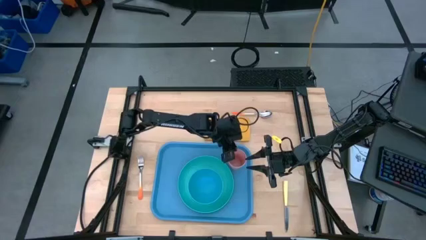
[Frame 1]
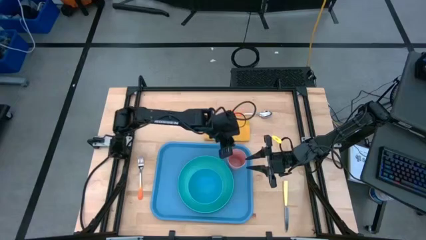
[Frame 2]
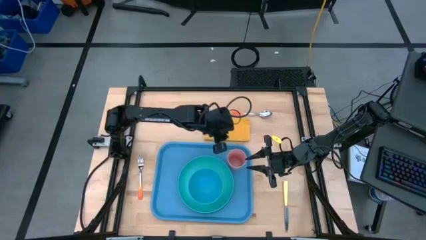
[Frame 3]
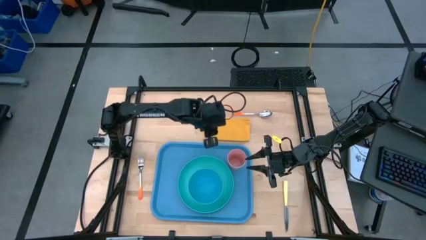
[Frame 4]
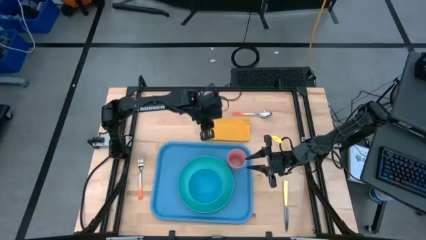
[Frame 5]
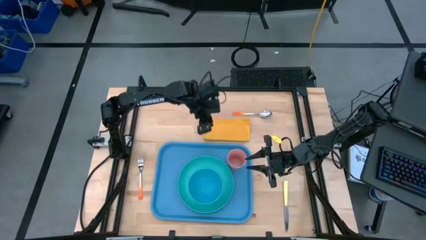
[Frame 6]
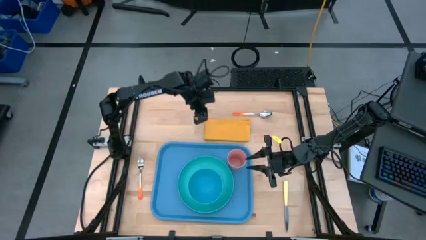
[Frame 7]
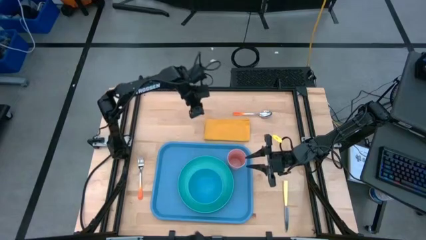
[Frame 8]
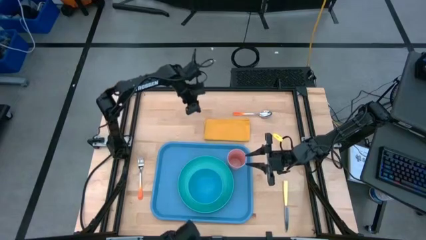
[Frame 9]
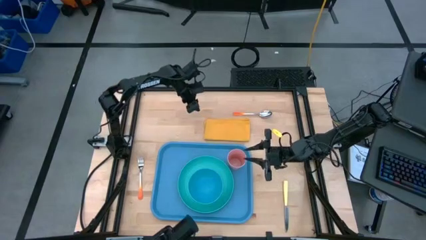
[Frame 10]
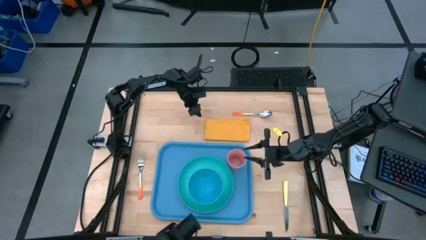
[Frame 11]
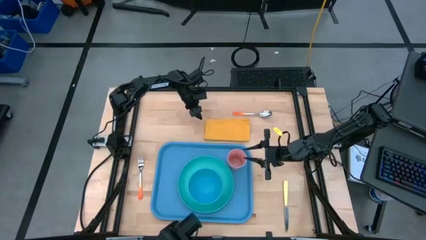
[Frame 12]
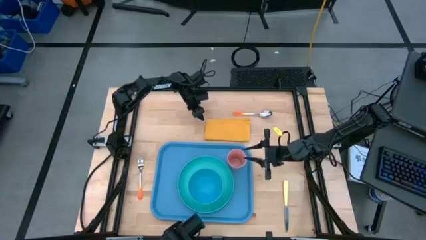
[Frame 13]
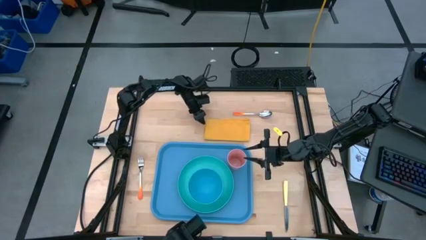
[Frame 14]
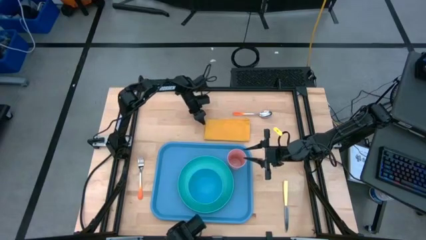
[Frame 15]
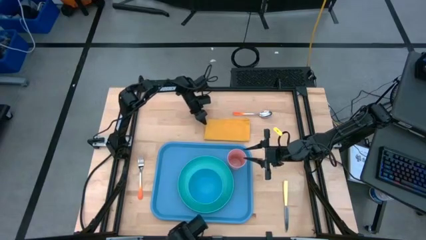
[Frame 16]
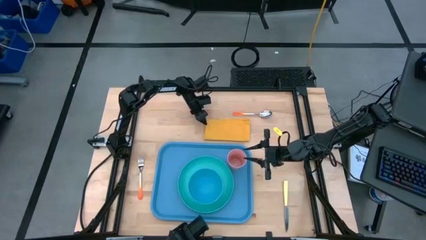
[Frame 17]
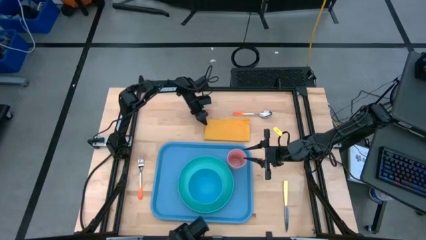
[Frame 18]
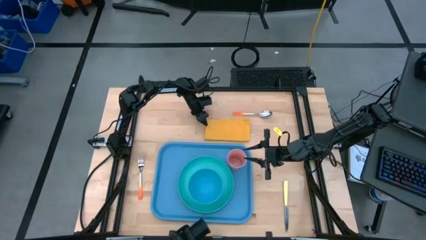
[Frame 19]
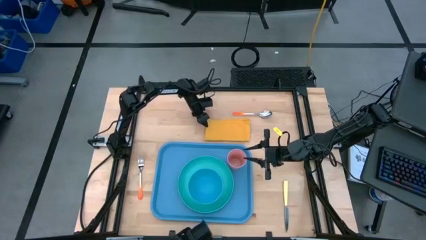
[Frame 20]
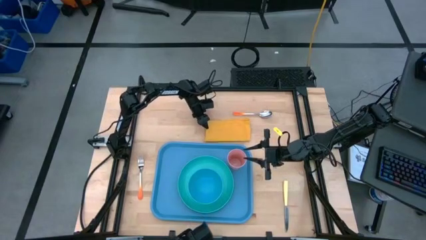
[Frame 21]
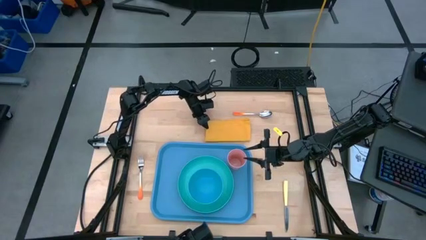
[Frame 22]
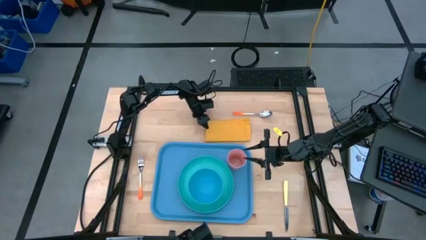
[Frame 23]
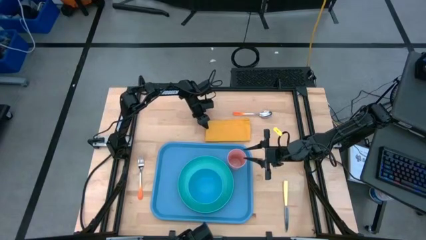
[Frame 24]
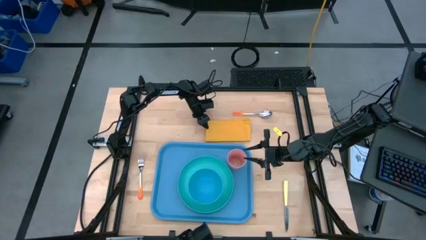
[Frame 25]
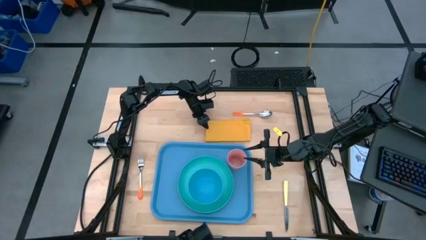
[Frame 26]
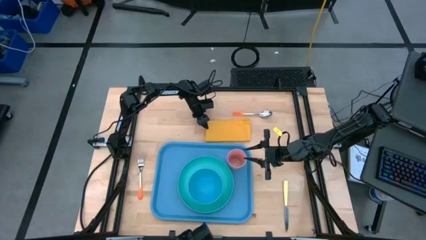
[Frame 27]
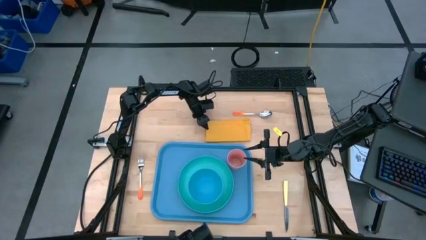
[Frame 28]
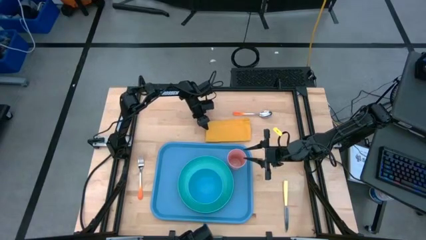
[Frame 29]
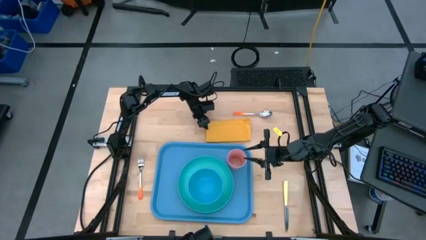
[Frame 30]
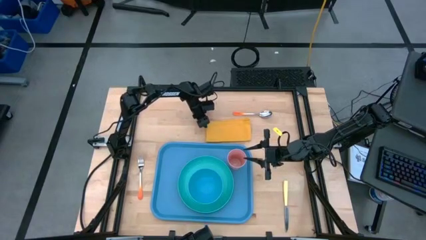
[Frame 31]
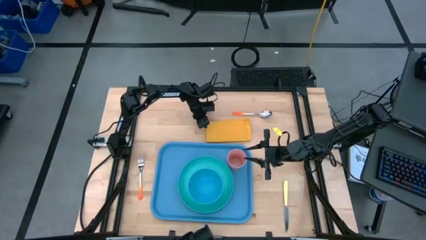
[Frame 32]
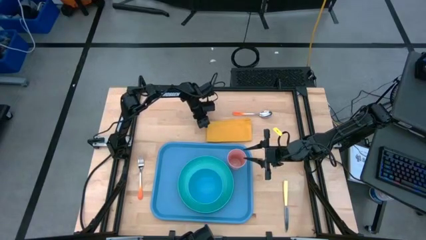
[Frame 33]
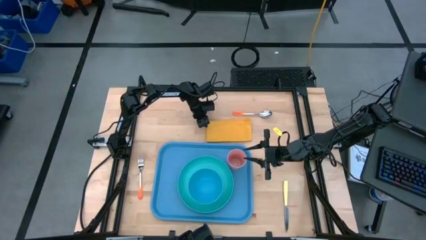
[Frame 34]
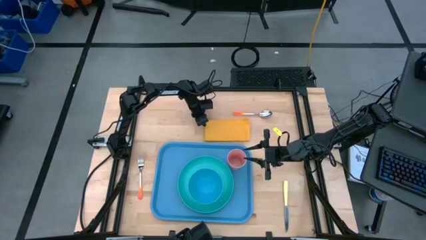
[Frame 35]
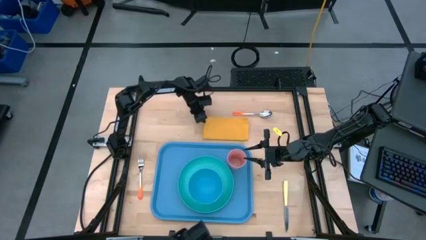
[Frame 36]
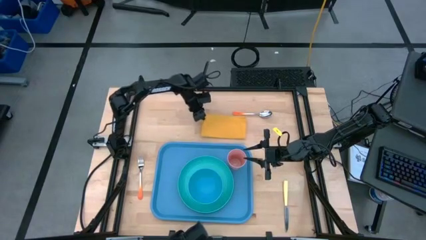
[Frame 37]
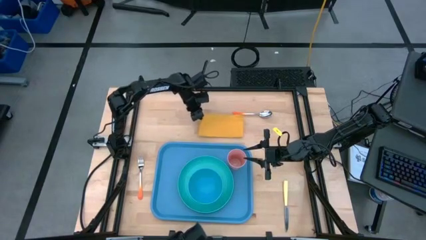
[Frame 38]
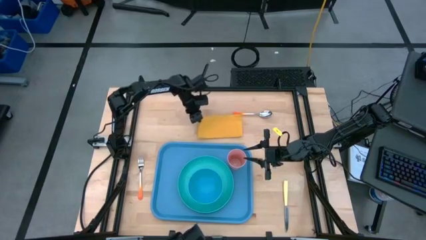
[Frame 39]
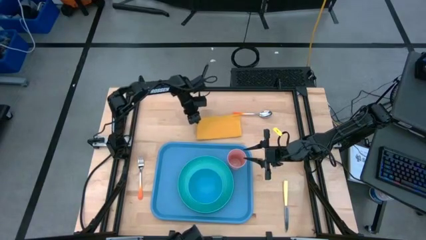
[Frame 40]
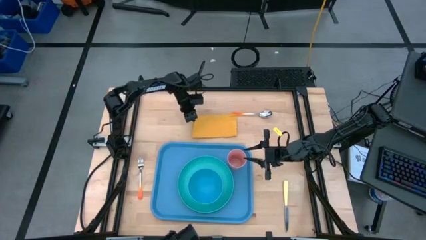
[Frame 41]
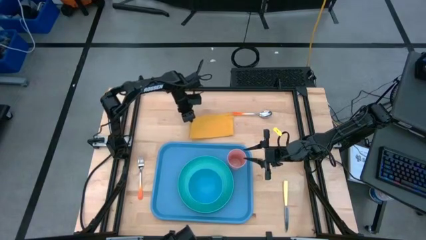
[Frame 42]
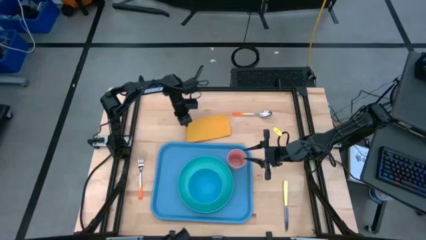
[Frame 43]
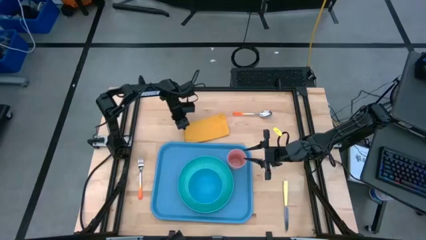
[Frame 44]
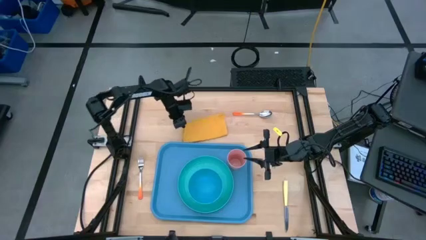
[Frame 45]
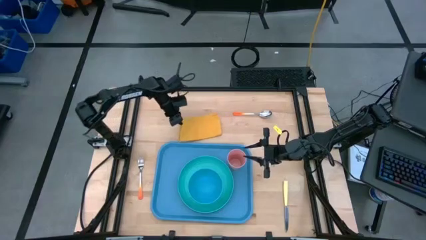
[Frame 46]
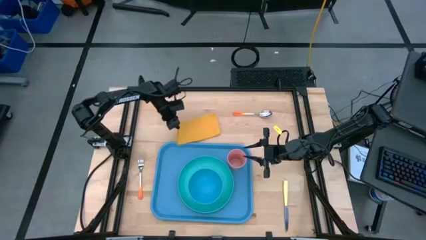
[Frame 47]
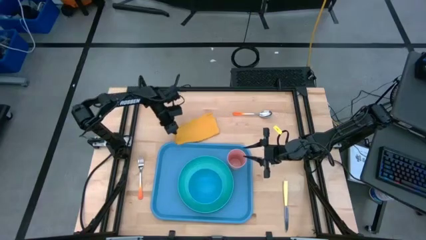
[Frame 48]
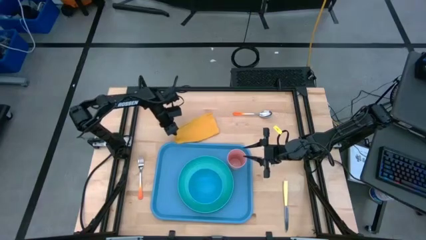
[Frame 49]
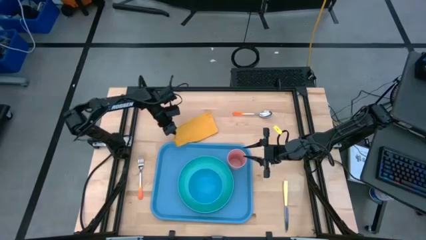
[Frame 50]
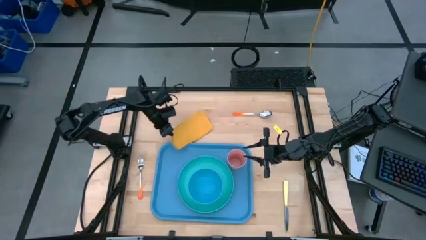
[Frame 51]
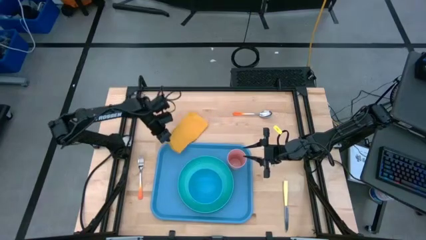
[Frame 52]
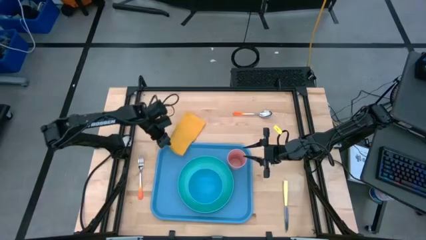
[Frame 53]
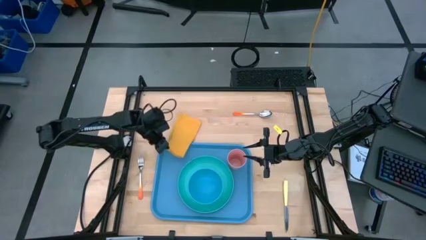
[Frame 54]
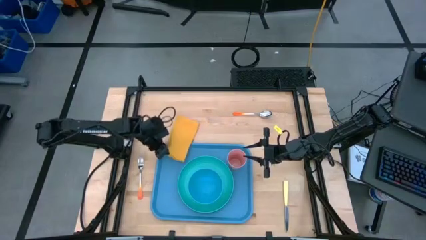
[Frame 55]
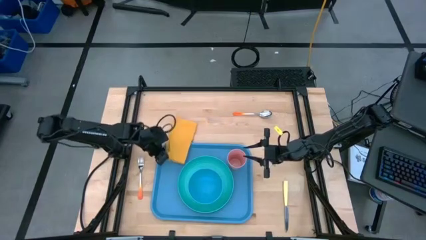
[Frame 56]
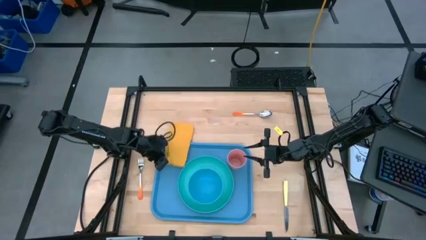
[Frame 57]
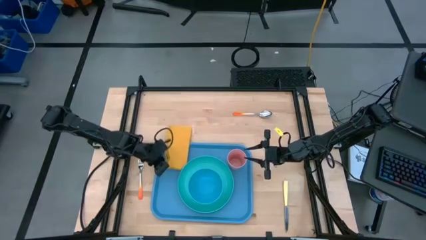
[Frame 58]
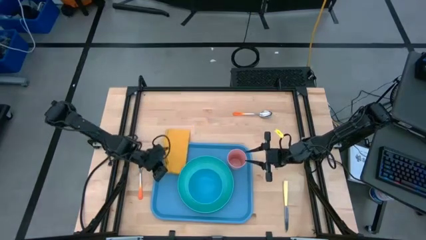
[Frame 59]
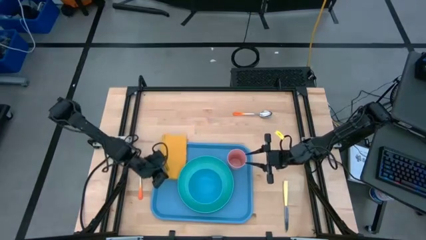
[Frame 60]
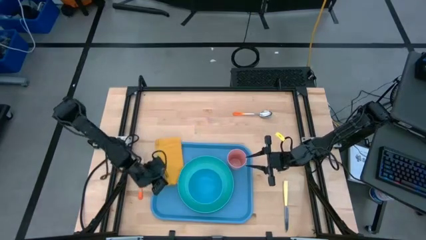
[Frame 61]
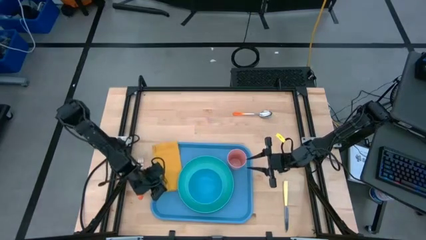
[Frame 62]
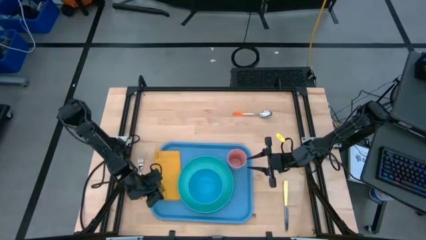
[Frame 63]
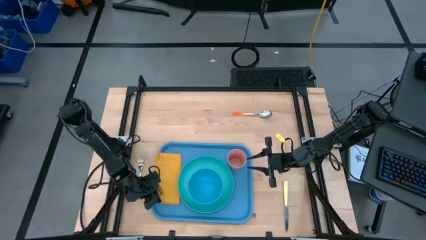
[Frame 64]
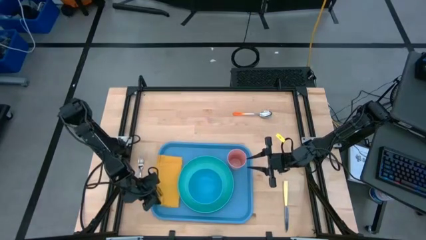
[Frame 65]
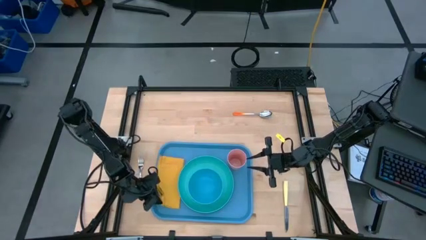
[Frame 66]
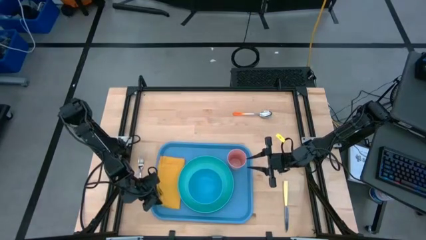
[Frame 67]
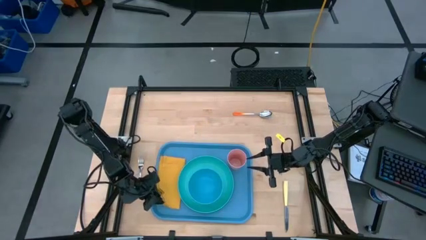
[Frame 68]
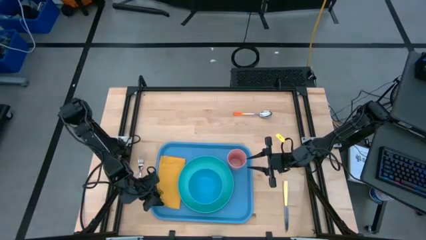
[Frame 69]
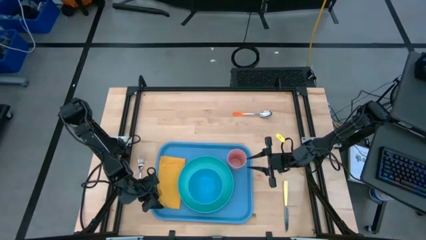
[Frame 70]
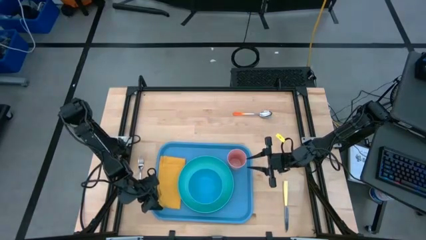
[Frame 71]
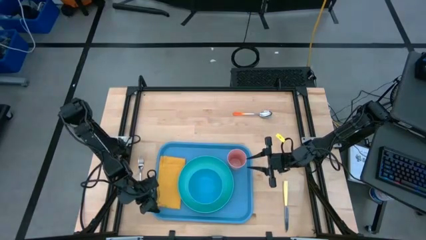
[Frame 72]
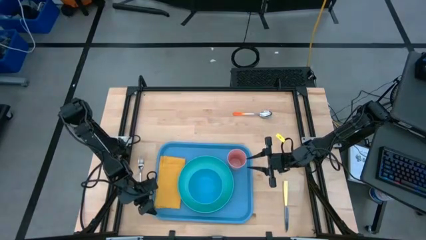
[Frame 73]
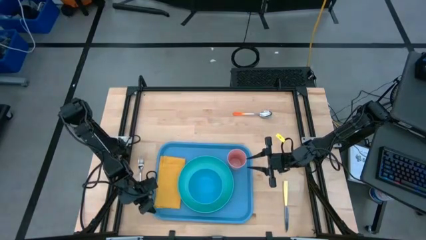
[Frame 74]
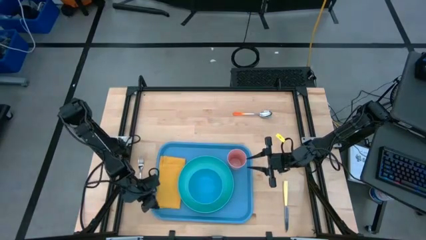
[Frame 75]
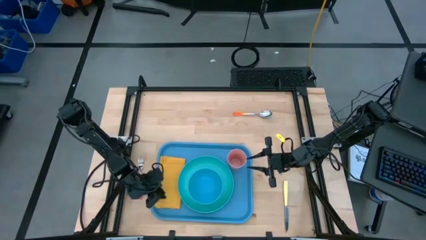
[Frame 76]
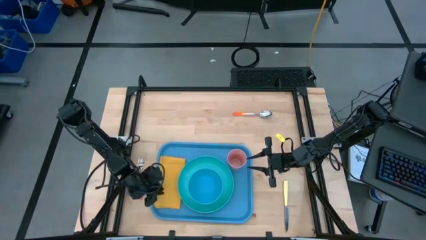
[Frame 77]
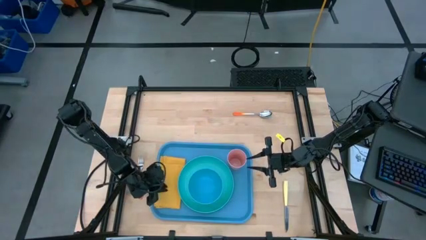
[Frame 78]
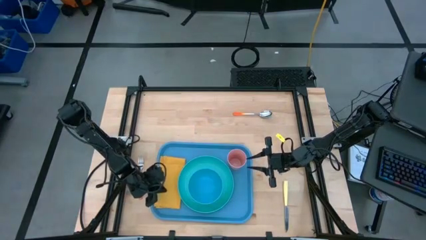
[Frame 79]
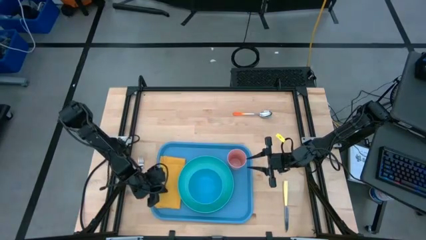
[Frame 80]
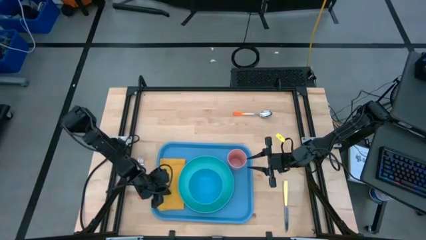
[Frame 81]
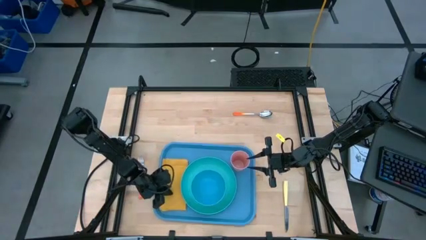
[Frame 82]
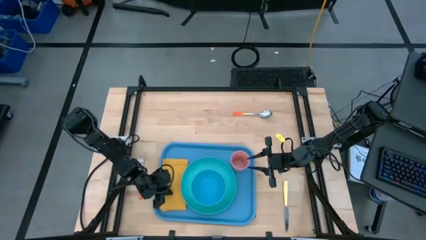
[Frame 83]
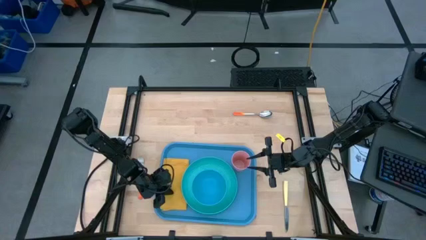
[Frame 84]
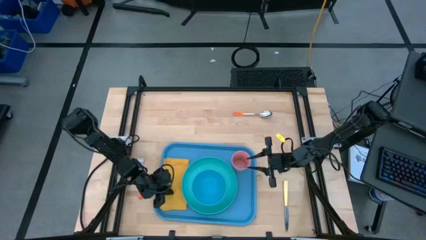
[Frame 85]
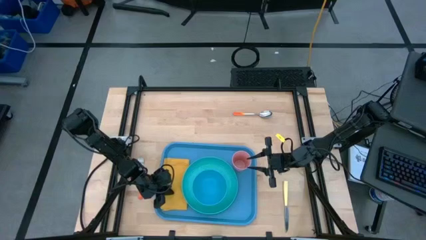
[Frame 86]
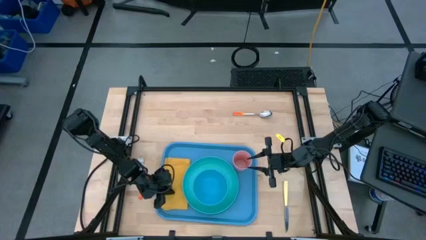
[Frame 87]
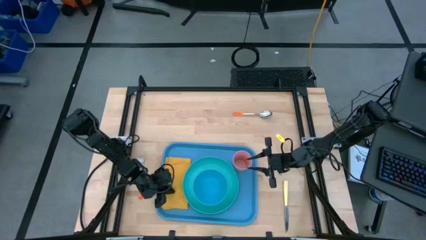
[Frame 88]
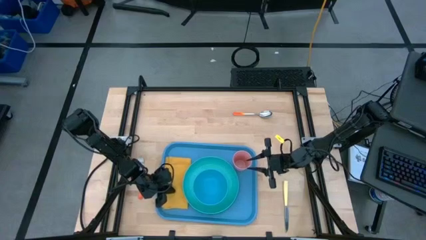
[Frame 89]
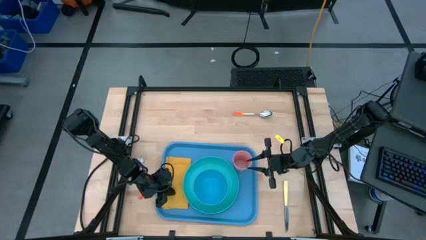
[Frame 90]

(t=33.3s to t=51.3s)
Task: Set up tray
Put the yellow napkin on the blue serving tray to the left of the blue plate
